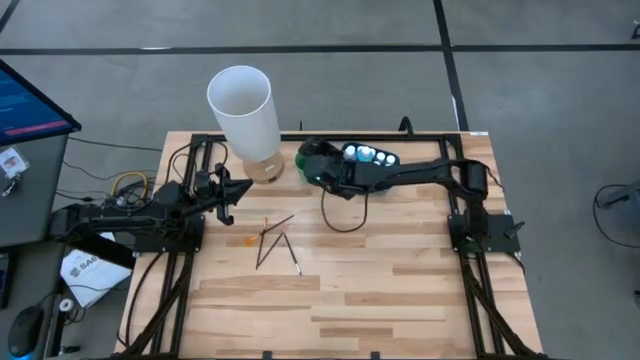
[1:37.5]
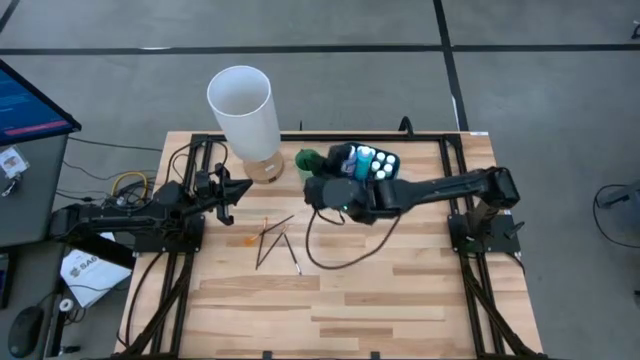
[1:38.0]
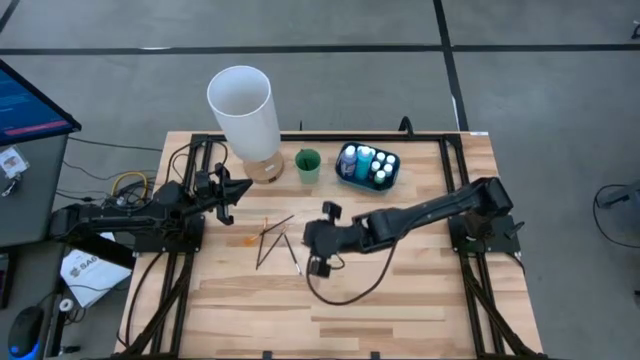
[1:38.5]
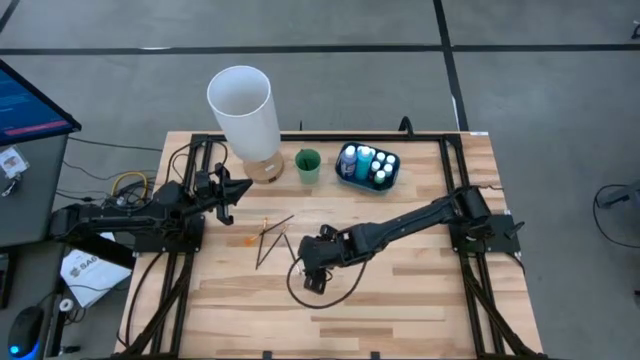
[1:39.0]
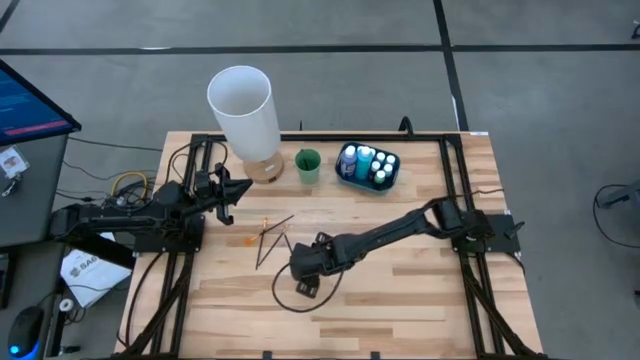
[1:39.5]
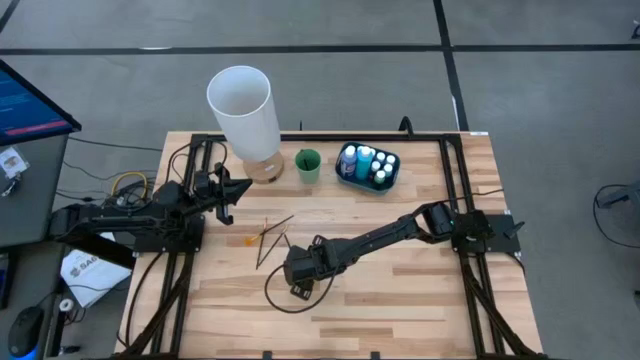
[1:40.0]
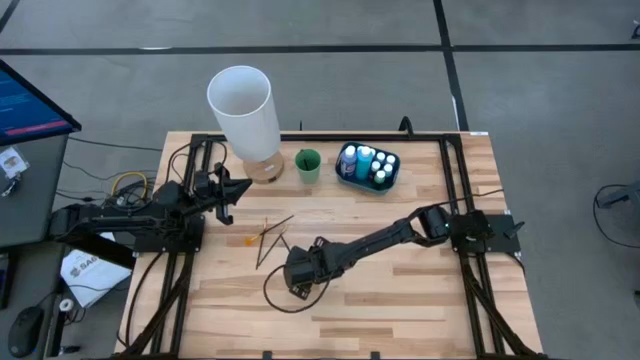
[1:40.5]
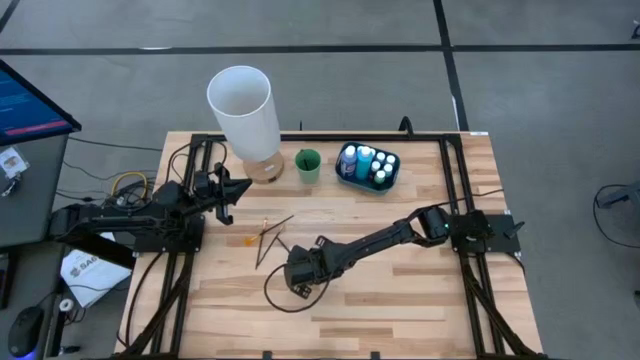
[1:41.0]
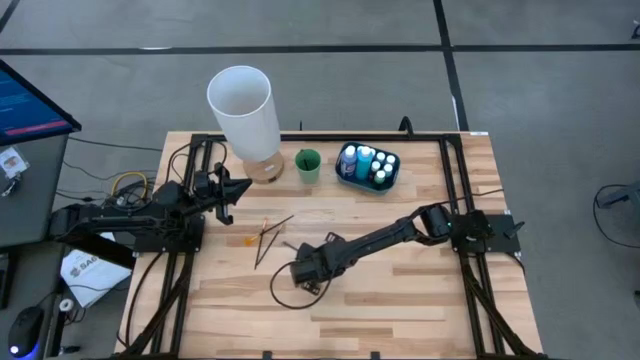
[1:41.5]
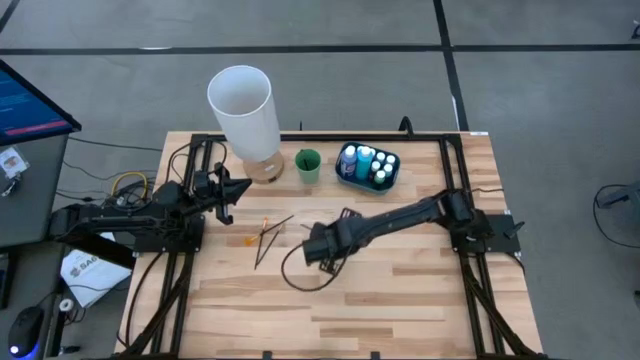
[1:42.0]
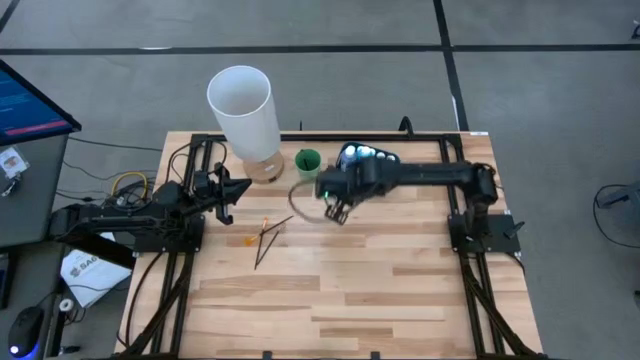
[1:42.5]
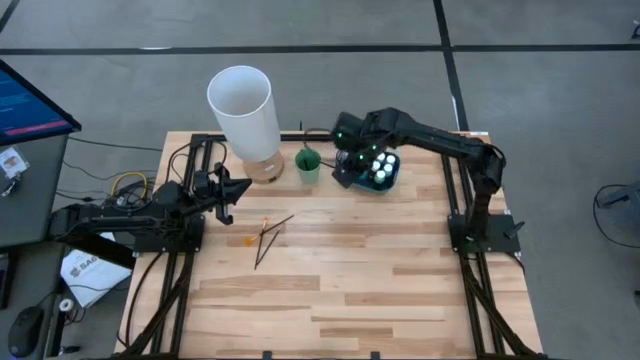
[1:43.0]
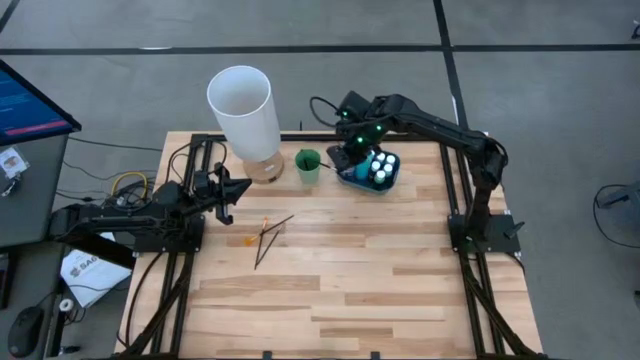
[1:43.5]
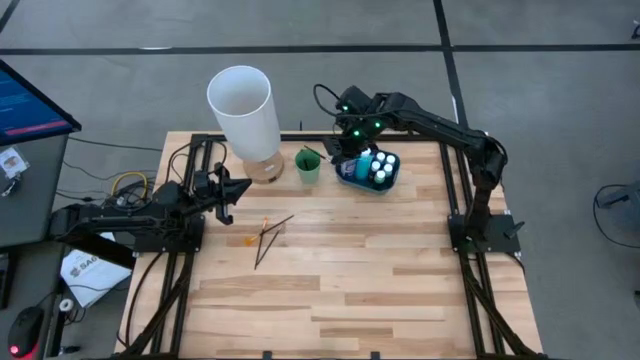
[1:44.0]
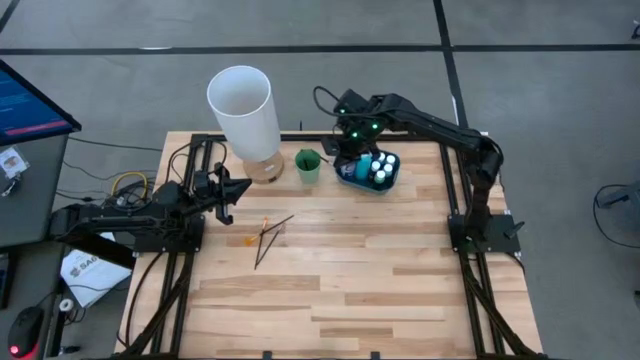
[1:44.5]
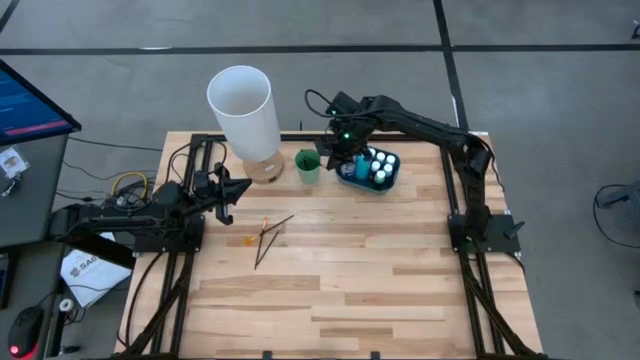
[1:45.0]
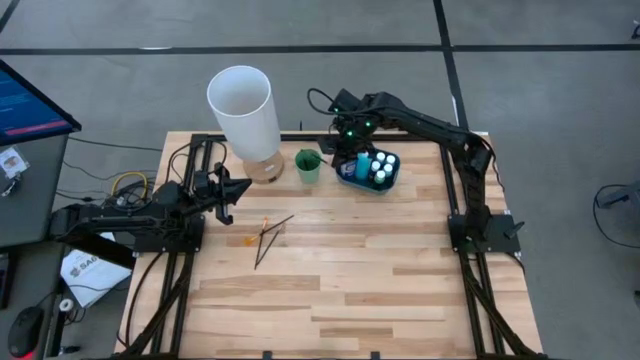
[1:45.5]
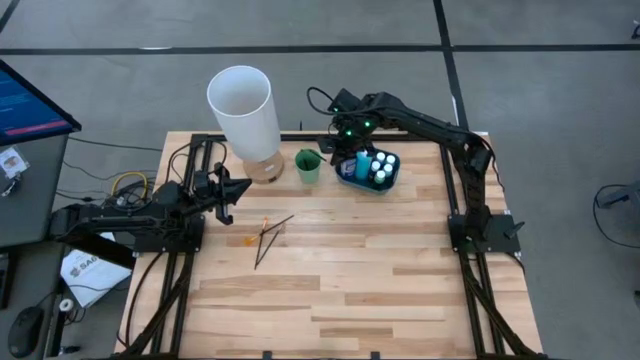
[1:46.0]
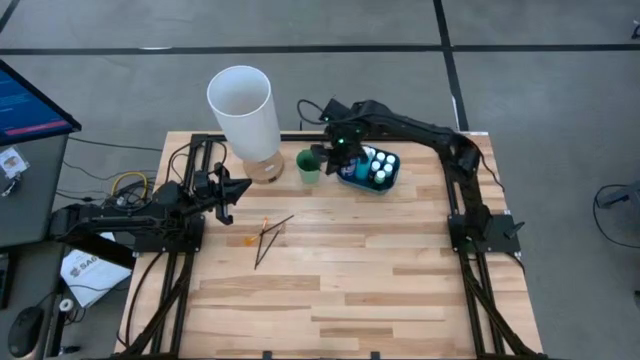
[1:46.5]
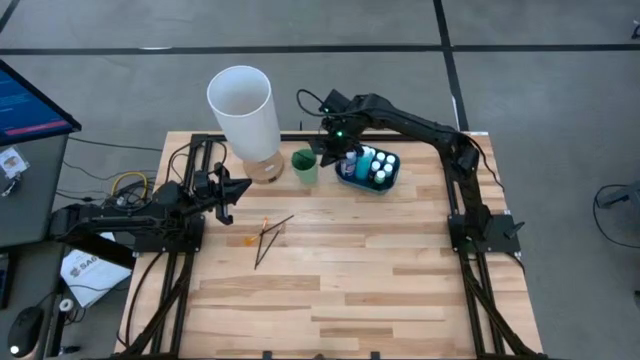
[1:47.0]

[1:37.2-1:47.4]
Task: Pick & Place Paint Supplies
Put the right silver paint brush into the green cup

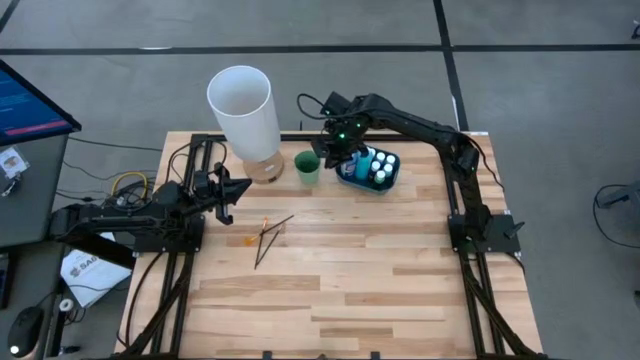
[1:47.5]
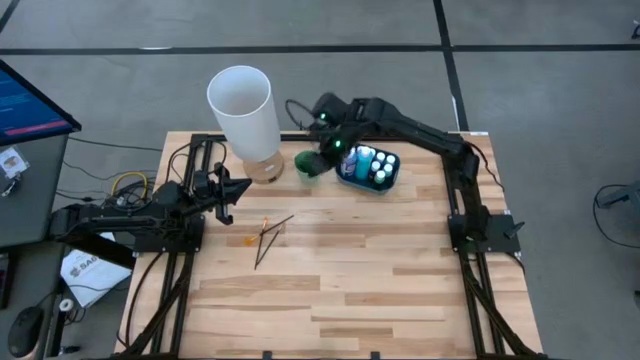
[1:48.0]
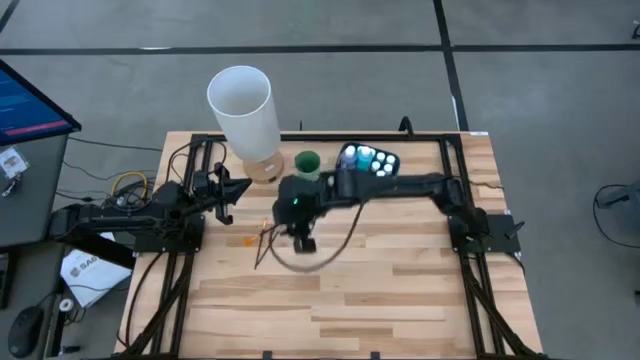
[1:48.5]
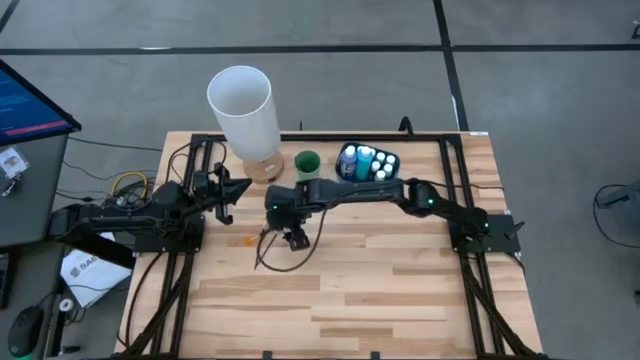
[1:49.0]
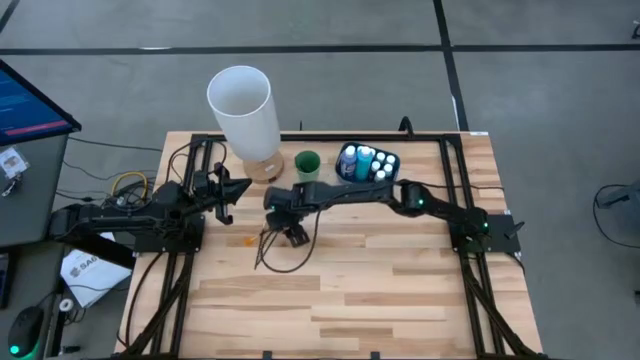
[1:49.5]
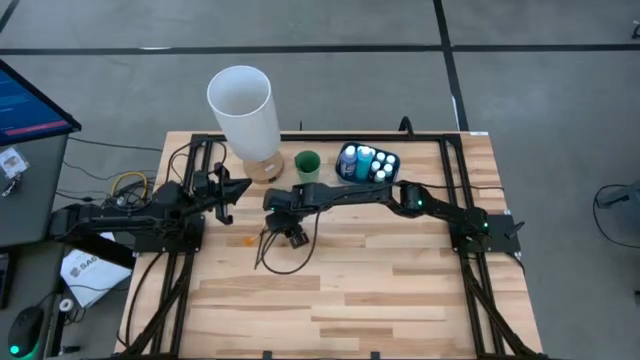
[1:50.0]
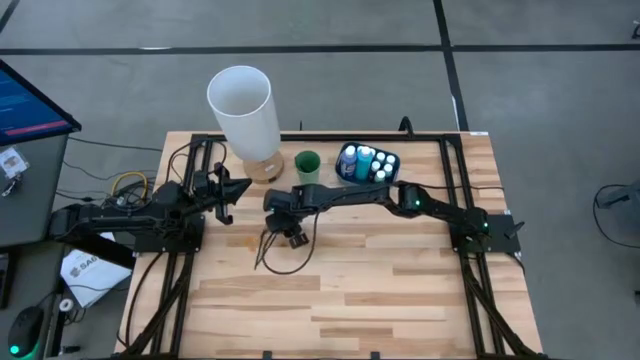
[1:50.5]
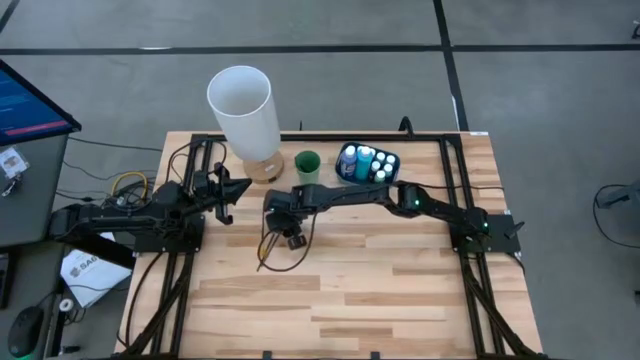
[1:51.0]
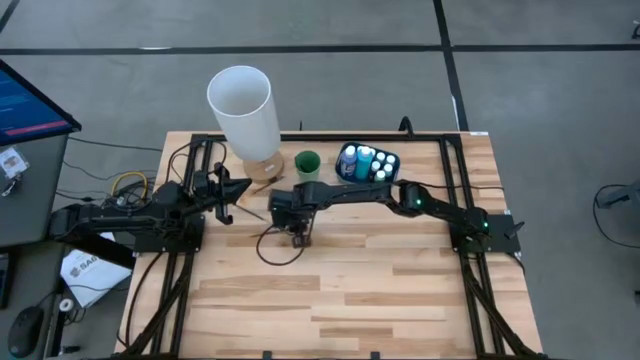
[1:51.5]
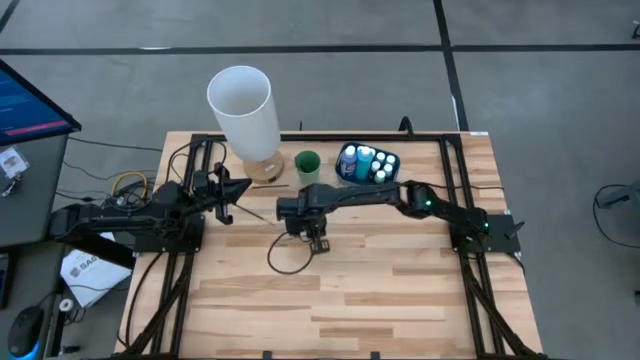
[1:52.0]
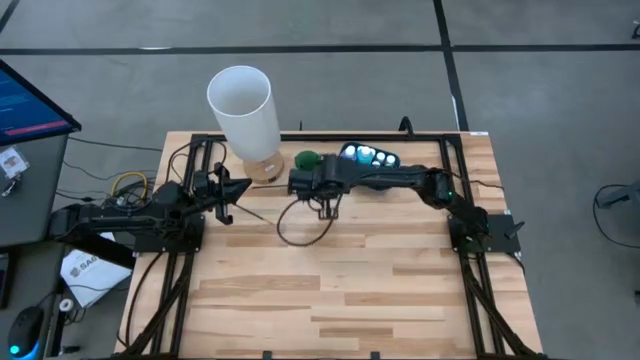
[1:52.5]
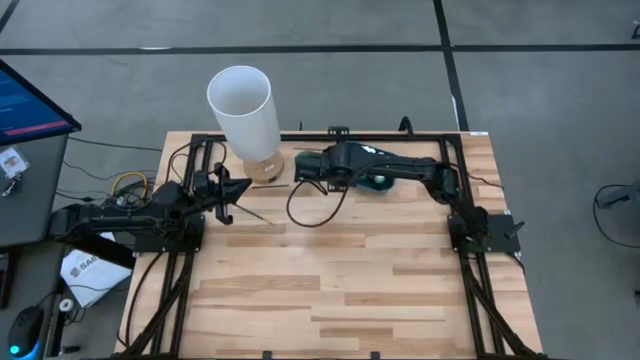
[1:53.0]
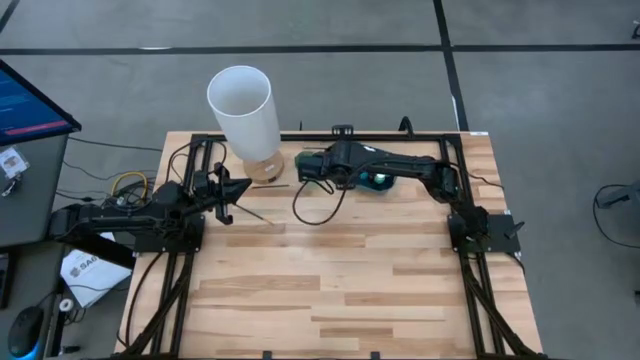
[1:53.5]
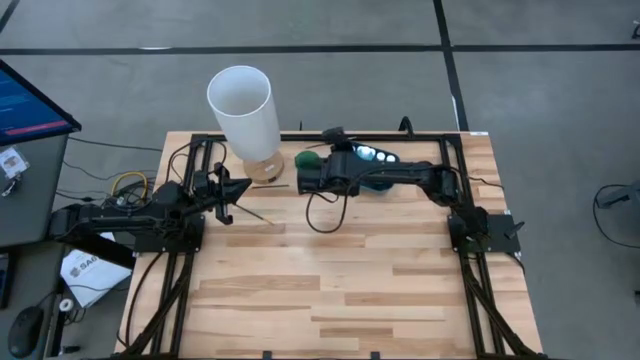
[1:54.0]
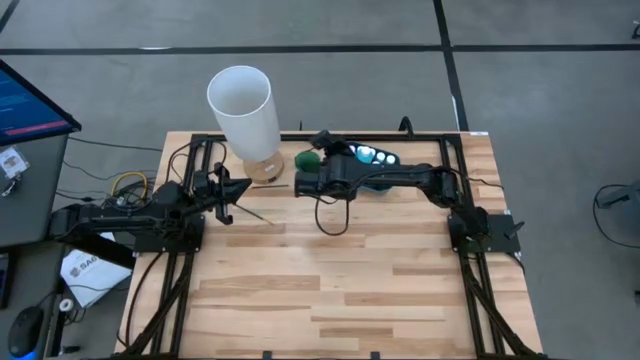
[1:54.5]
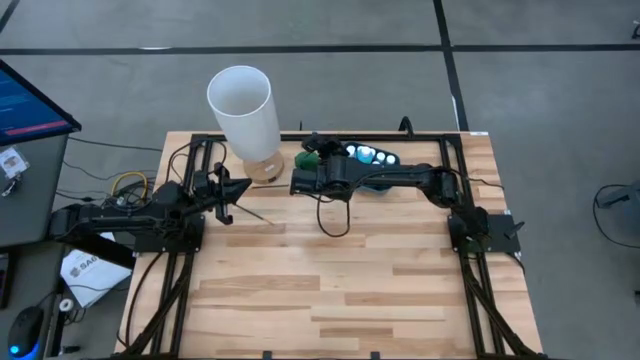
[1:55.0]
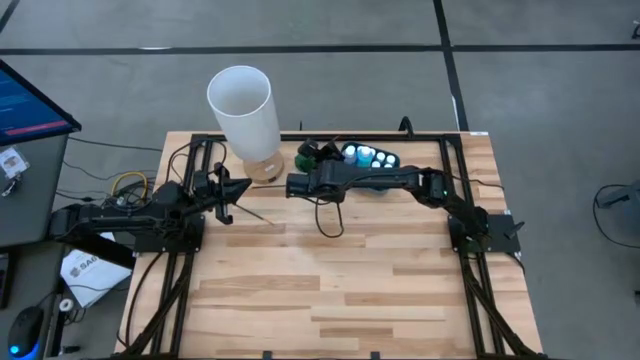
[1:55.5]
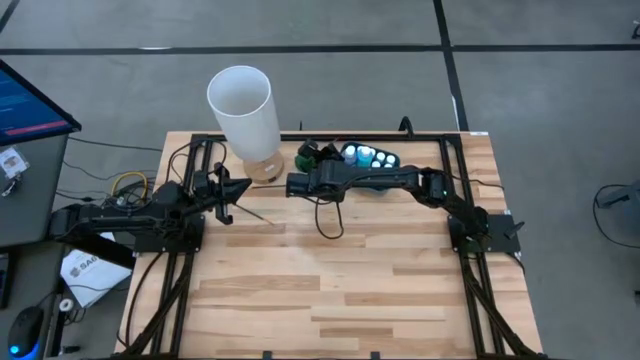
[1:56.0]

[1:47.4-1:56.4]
Put the right gold paint brush into the green cup

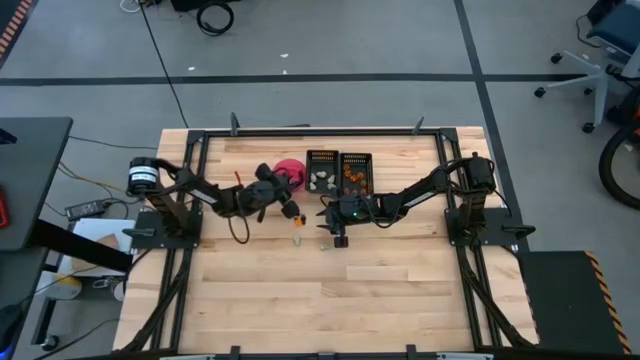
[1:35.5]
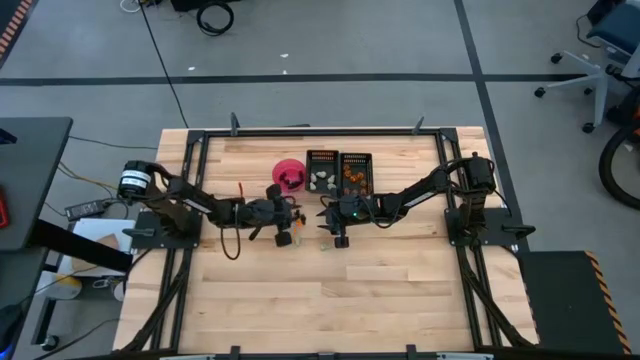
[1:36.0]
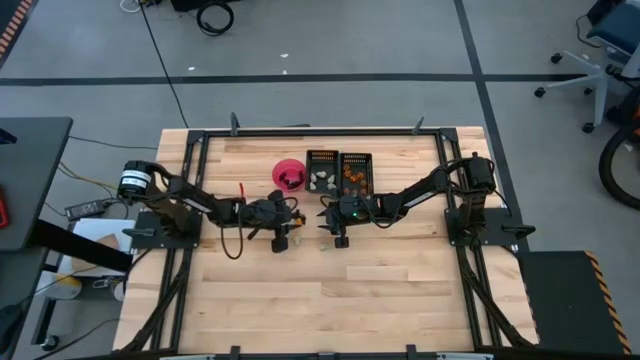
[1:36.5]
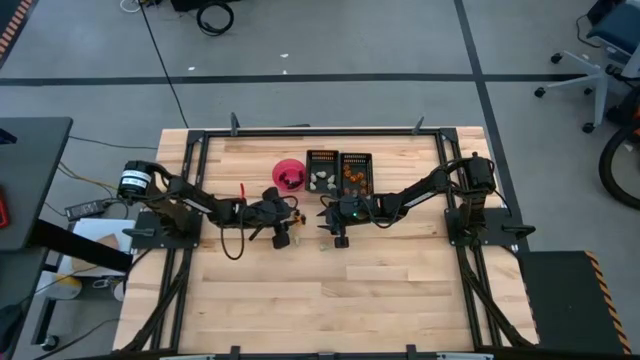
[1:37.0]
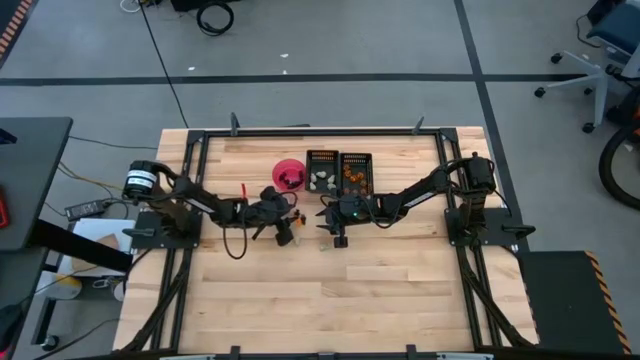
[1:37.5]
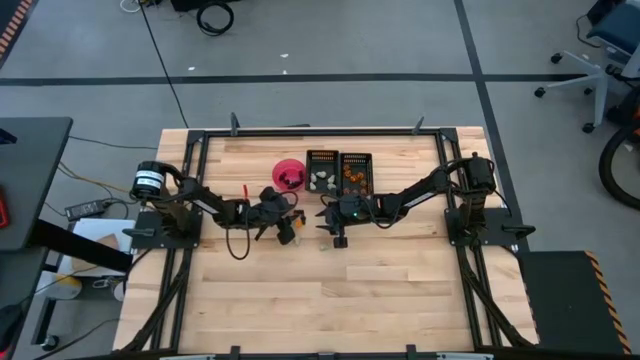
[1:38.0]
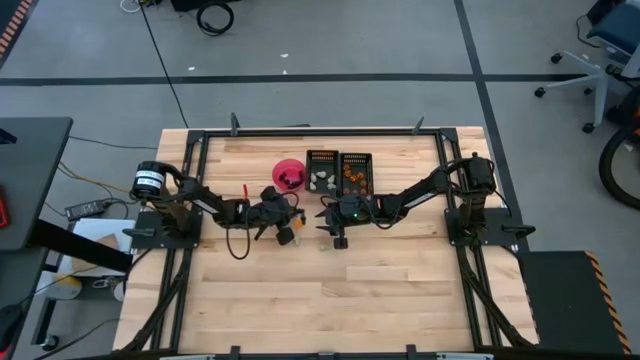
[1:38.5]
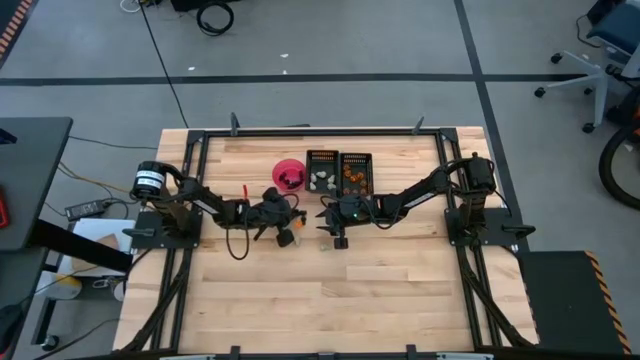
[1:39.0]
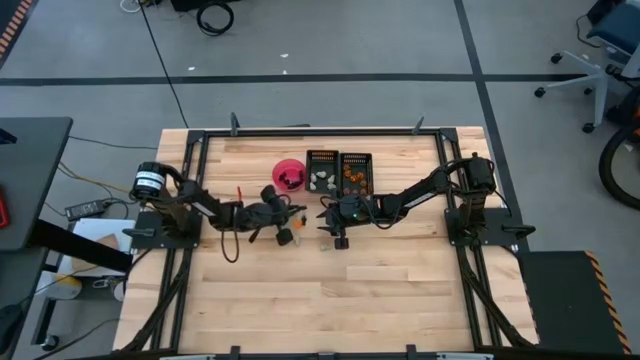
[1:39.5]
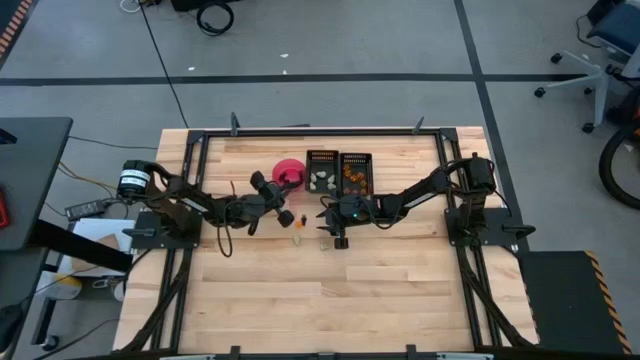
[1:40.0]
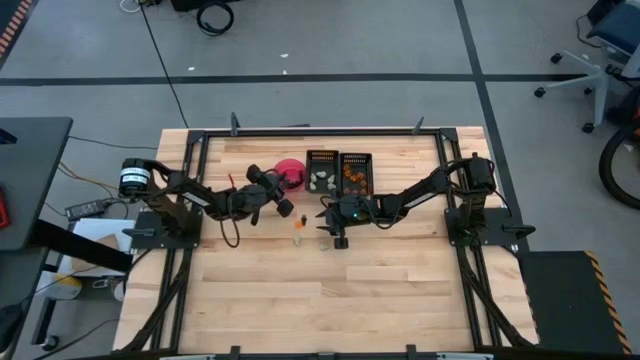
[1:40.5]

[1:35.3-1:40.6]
Task: Sort Halloween decoration
Put the black skeleton toy into the red bowl
